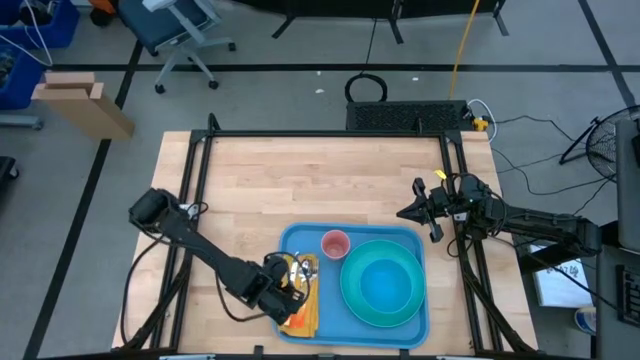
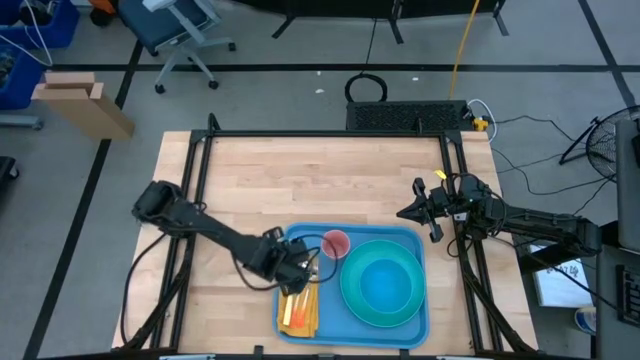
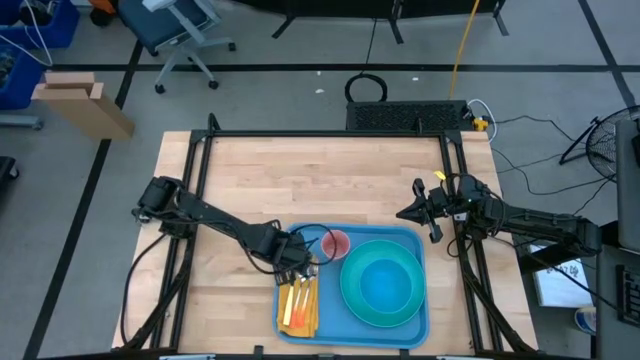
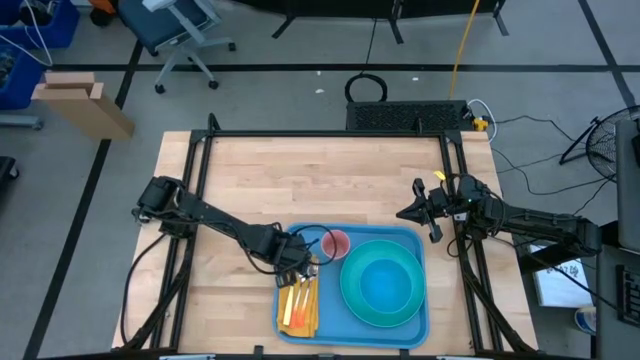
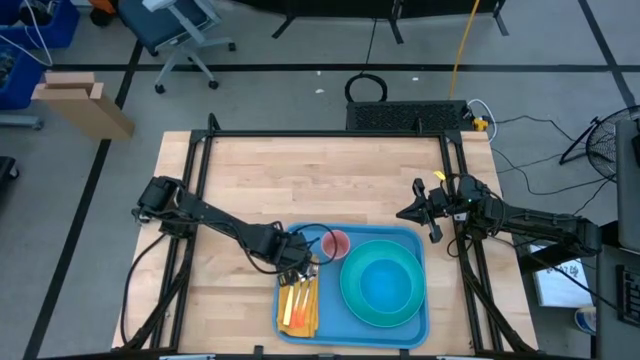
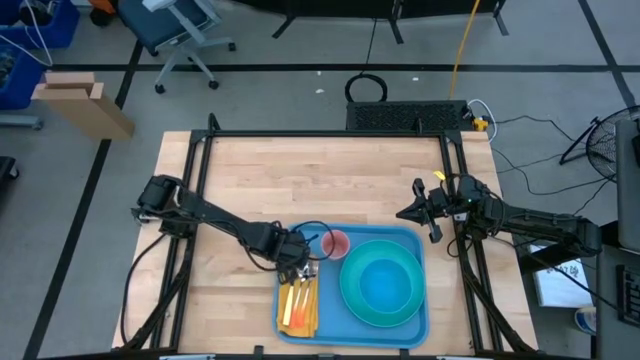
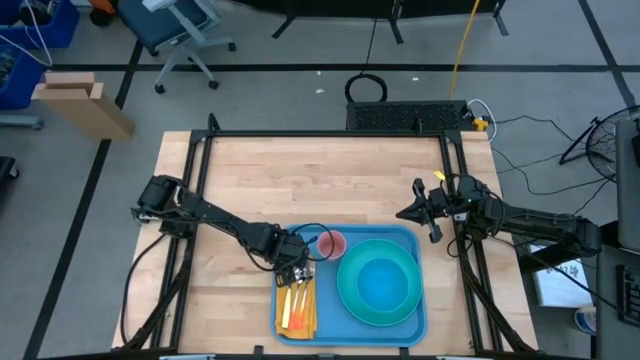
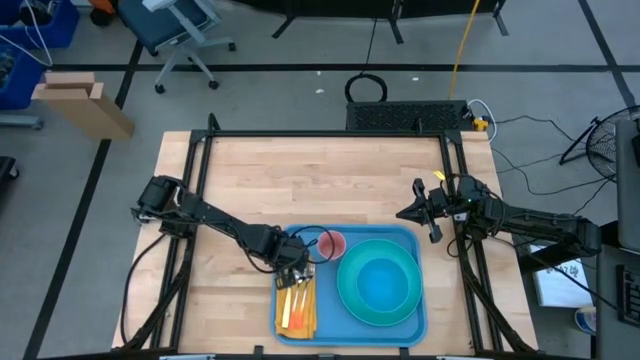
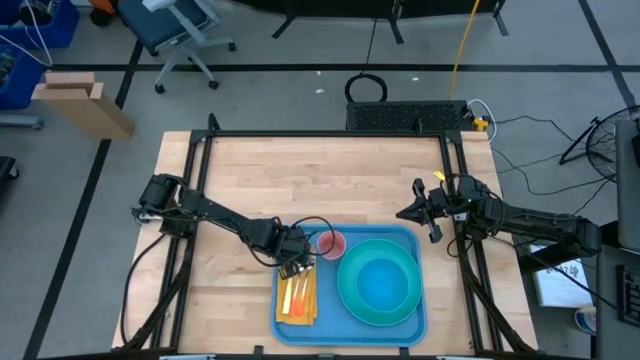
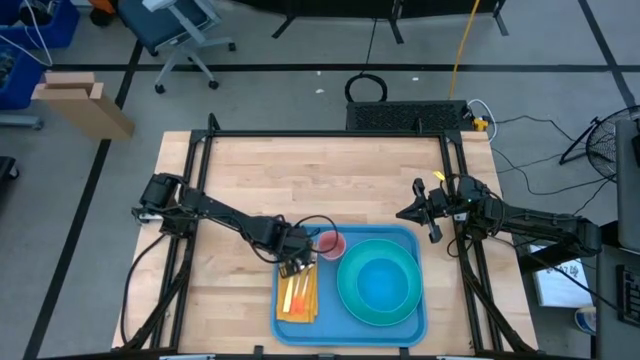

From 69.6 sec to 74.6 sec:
Task: Set up tray
Adjust the yellow napkin

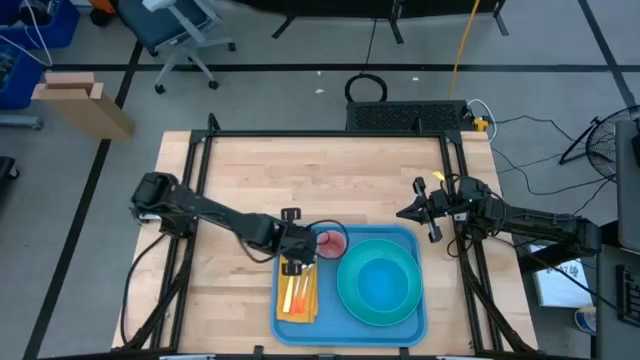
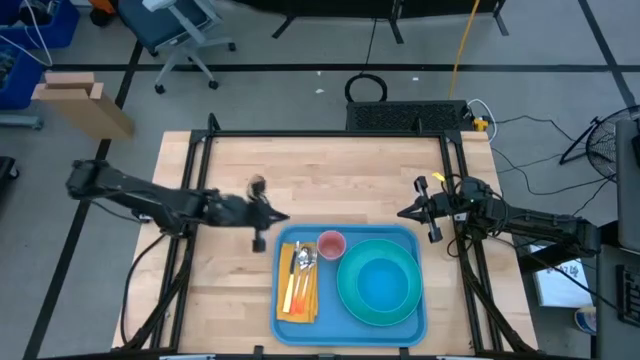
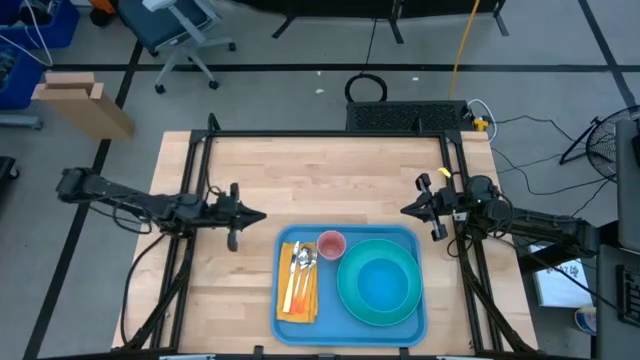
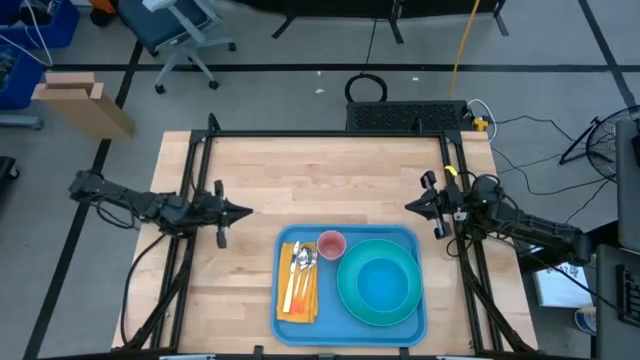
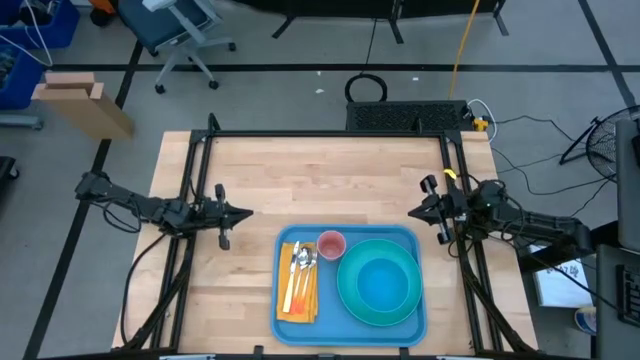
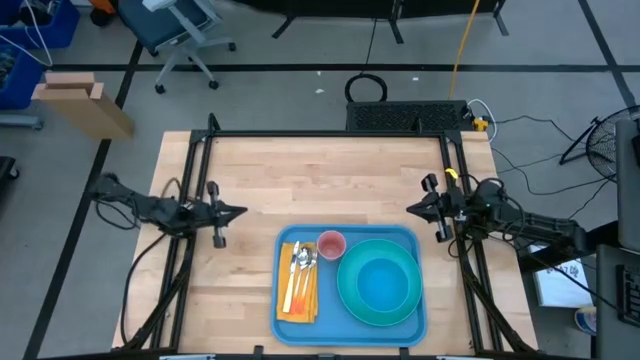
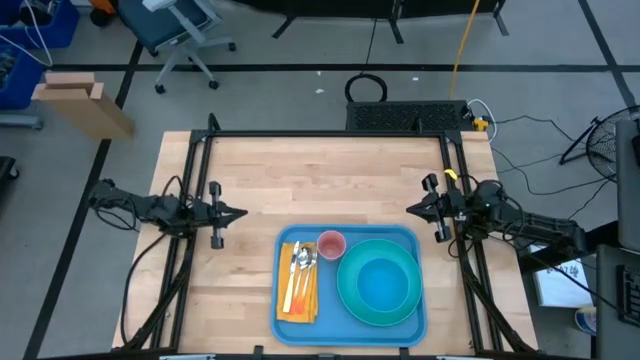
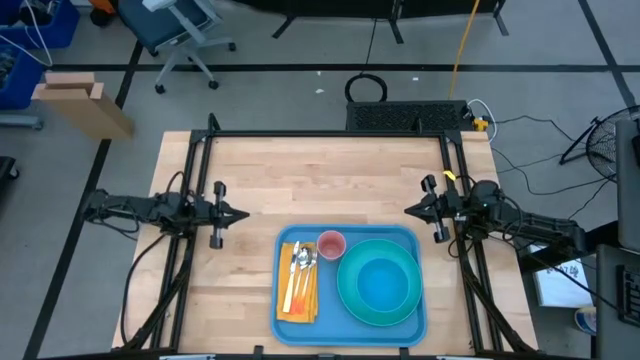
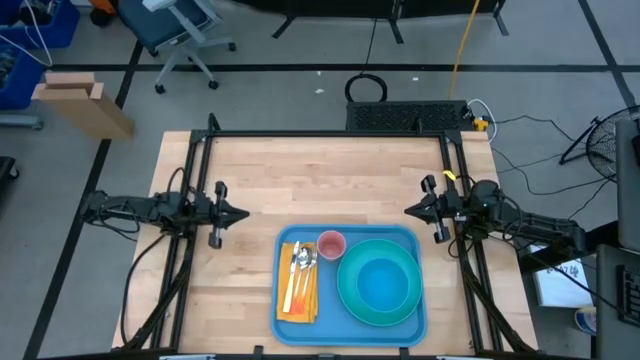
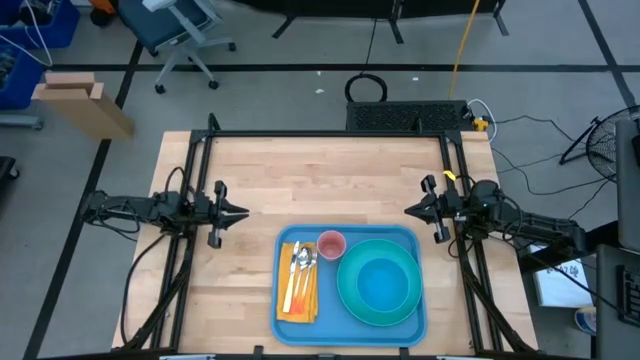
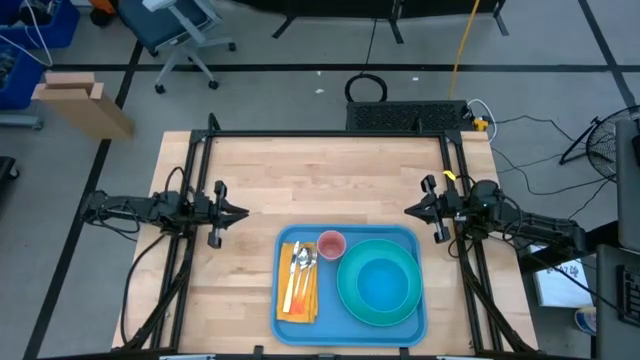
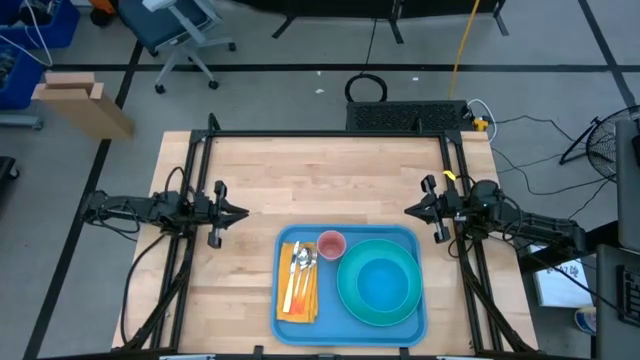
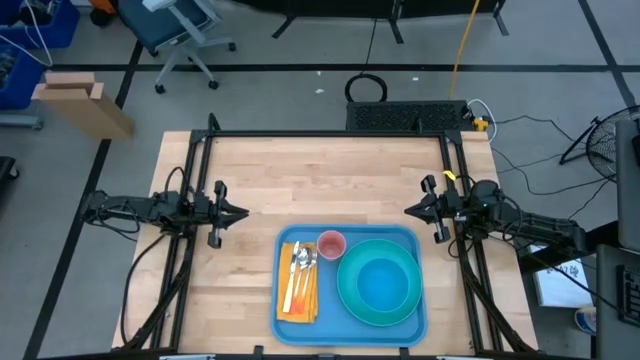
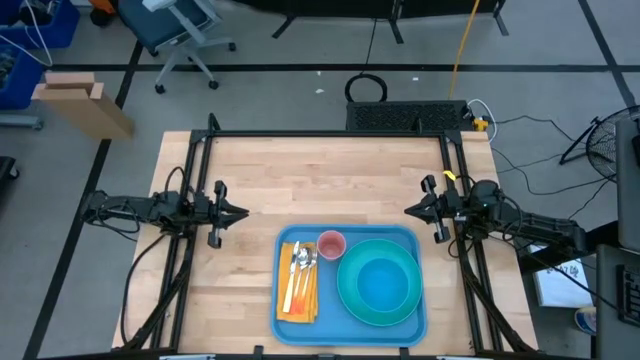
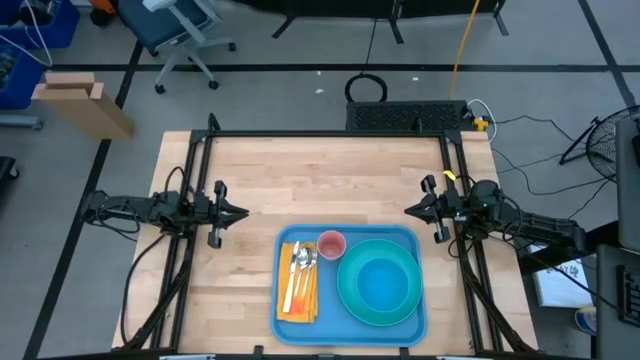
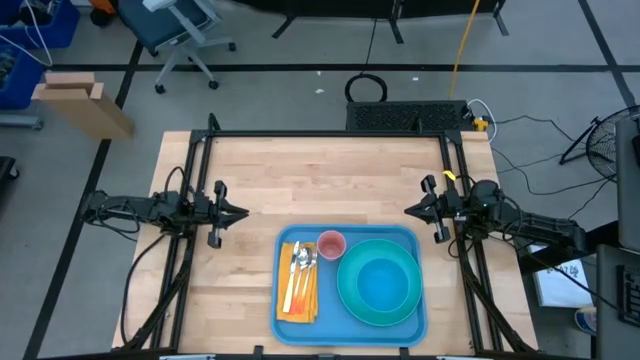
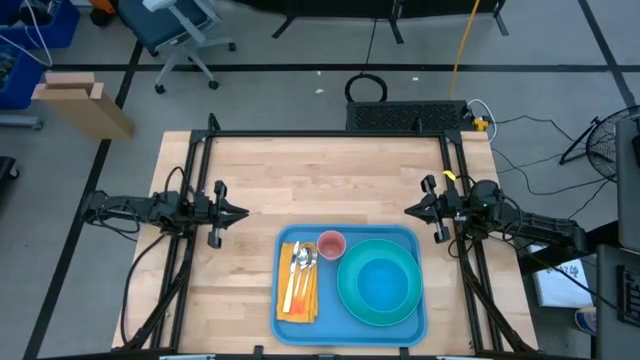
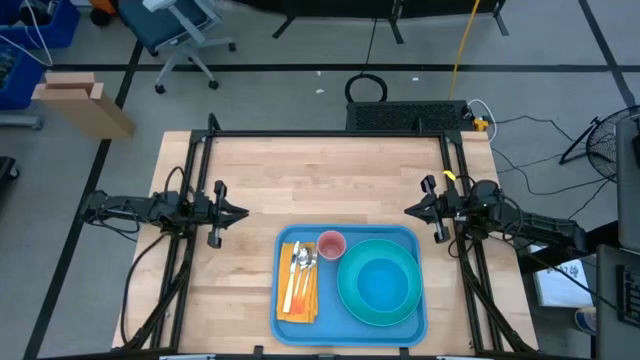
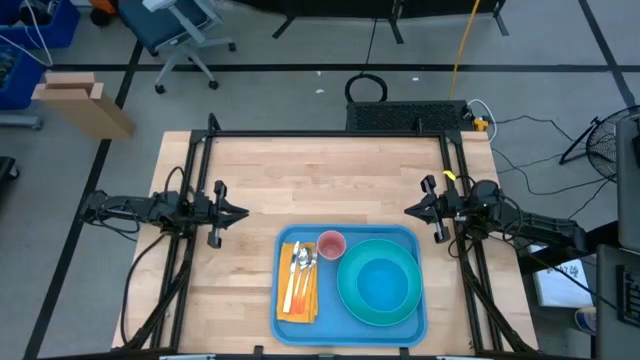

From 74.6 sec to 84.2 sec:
Return to Home Position

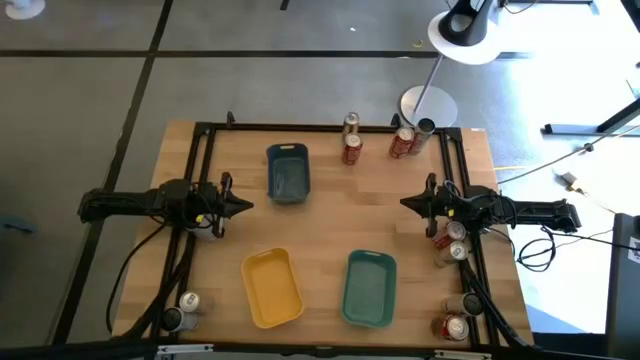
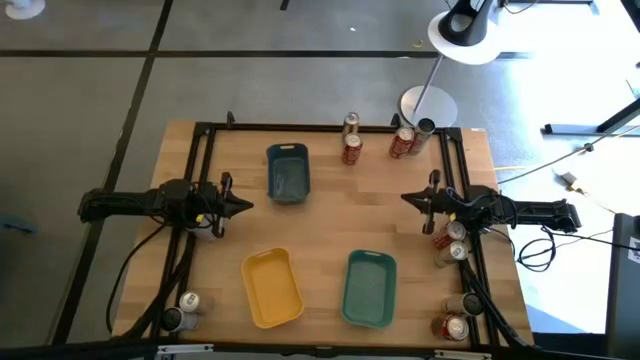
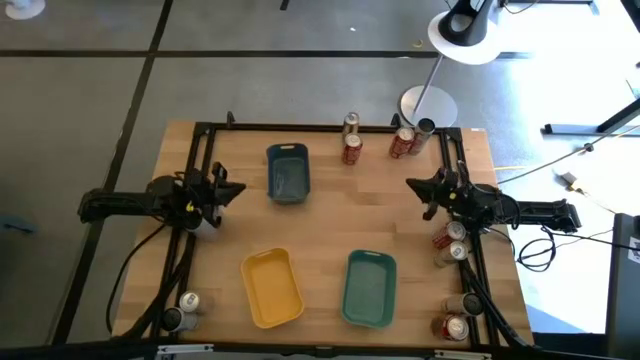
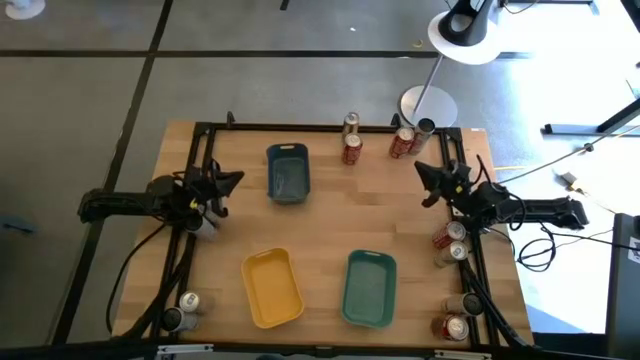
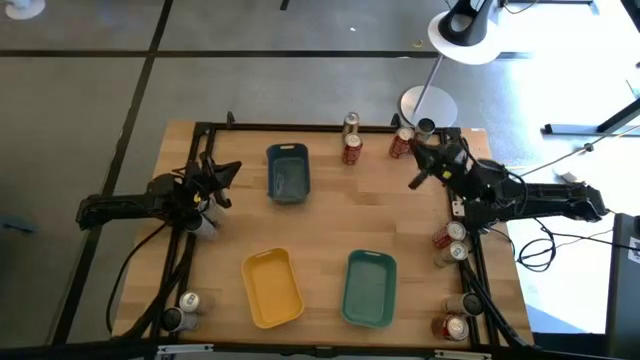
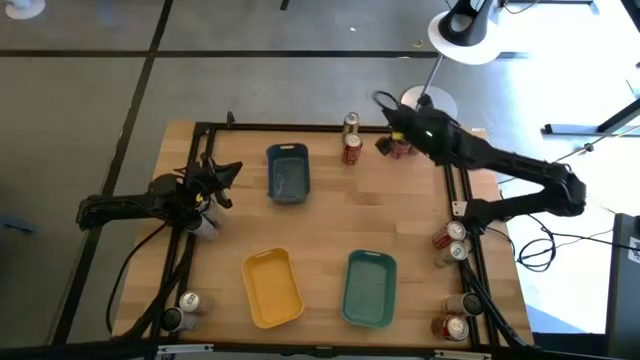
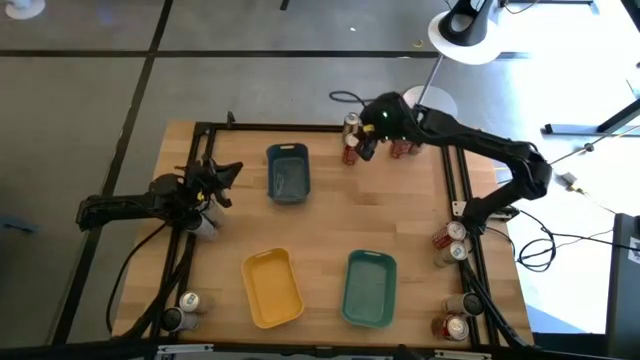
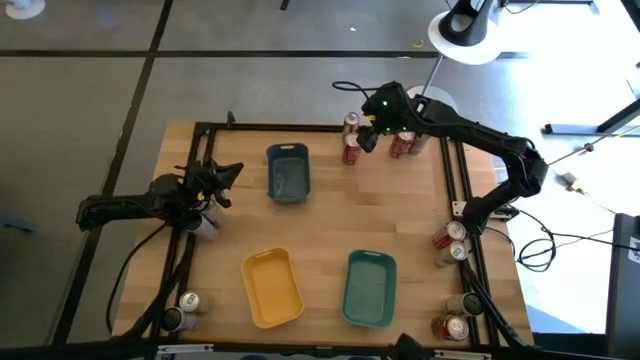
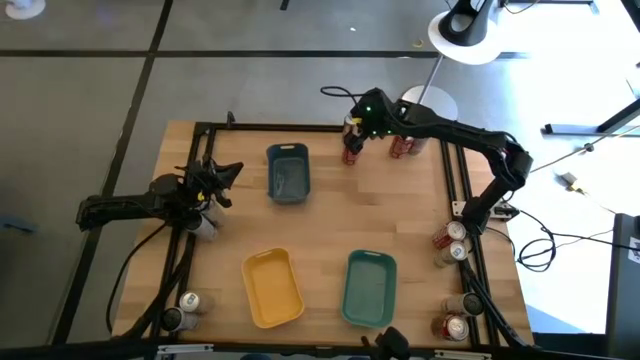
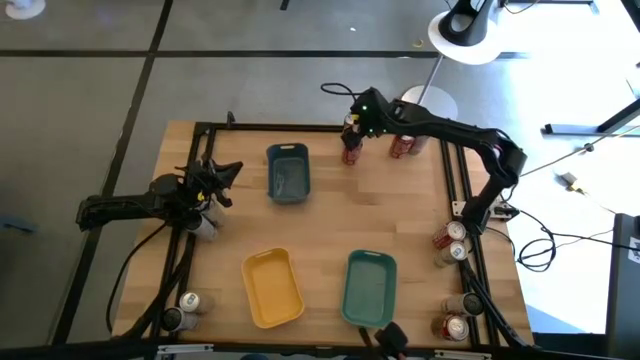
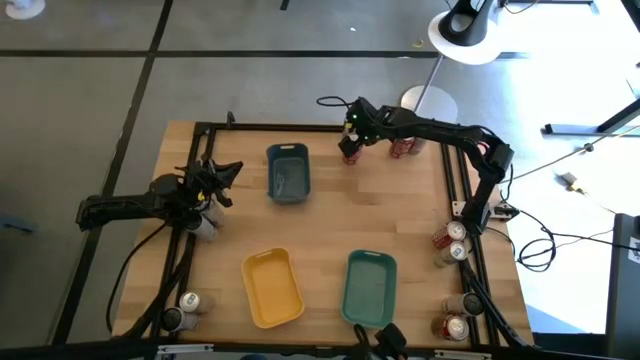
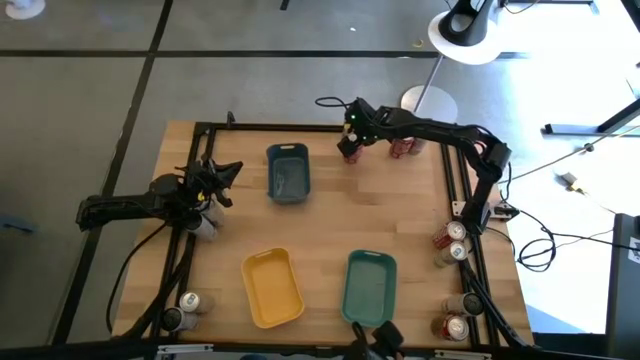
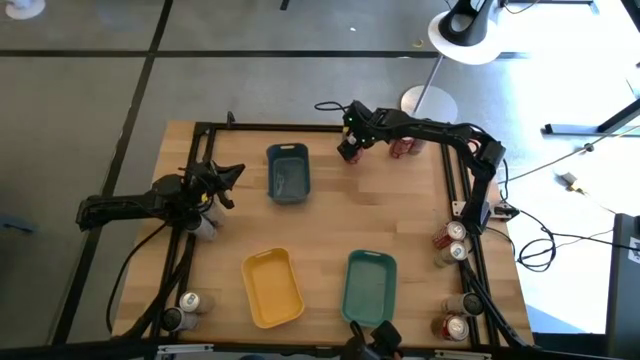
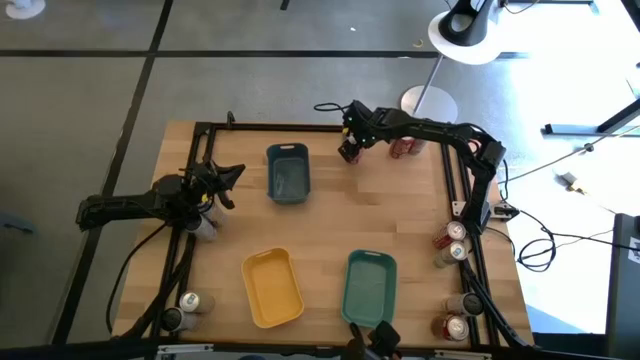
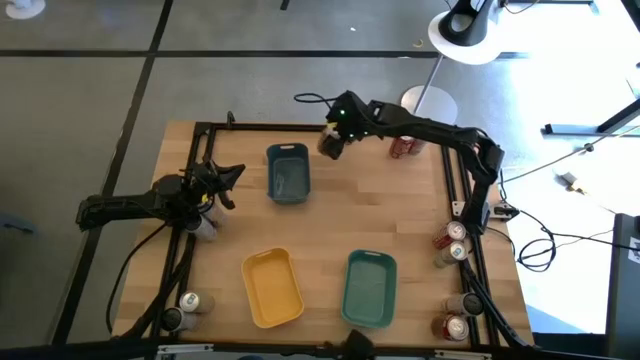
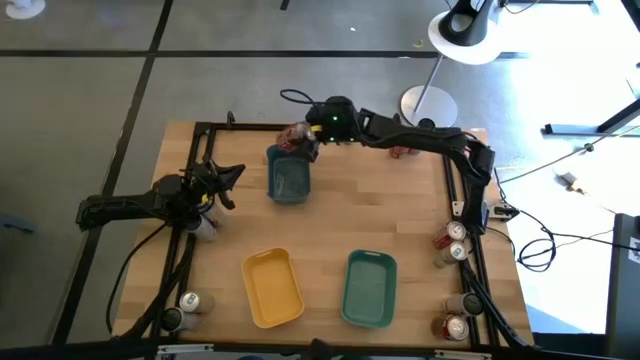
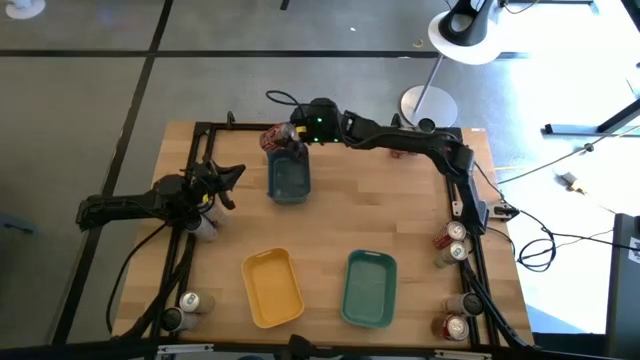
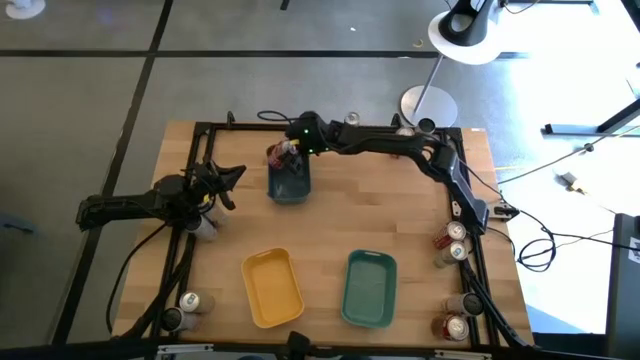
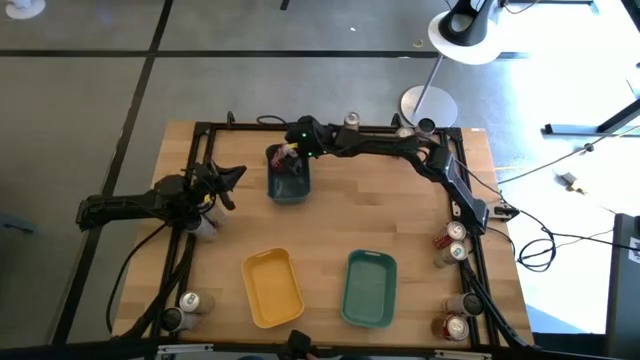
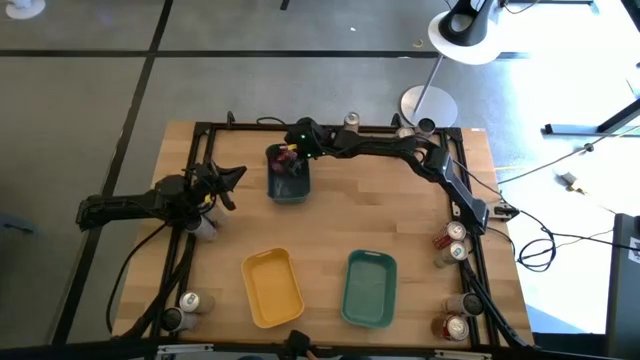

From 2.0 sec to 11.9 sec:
Task: Sort soda cans
Put the red and white soda can into the blue bin
